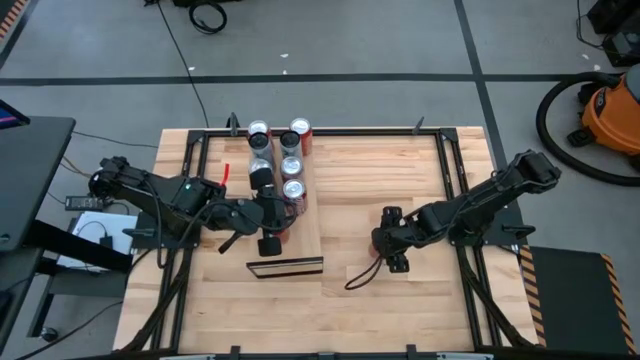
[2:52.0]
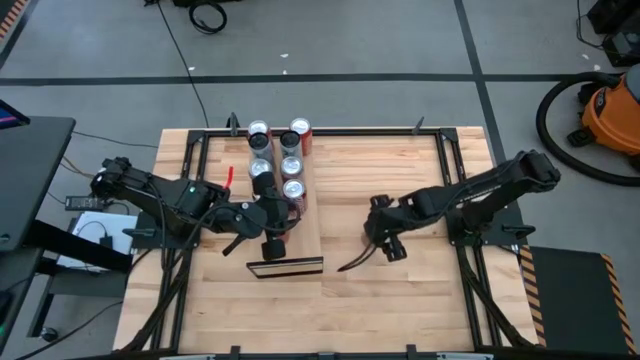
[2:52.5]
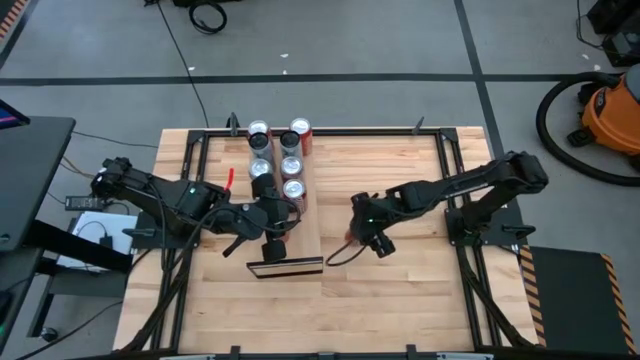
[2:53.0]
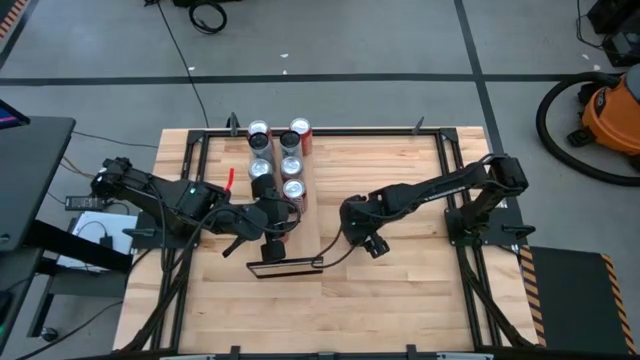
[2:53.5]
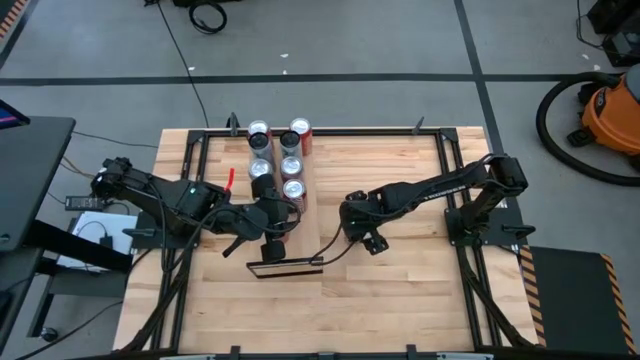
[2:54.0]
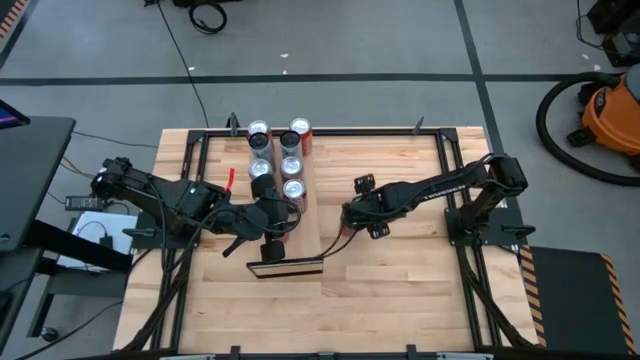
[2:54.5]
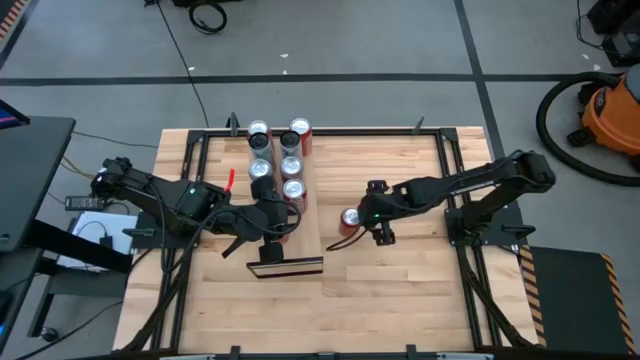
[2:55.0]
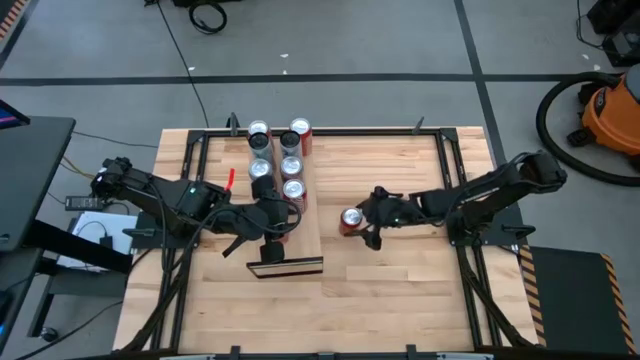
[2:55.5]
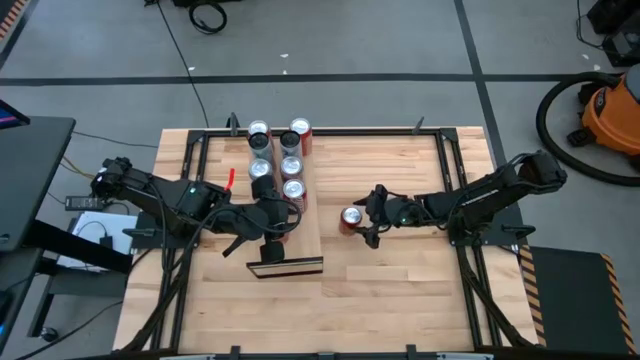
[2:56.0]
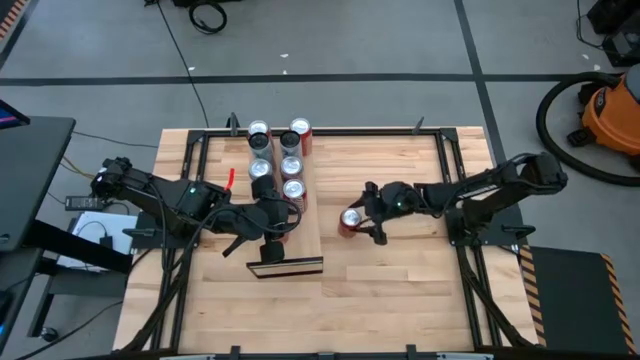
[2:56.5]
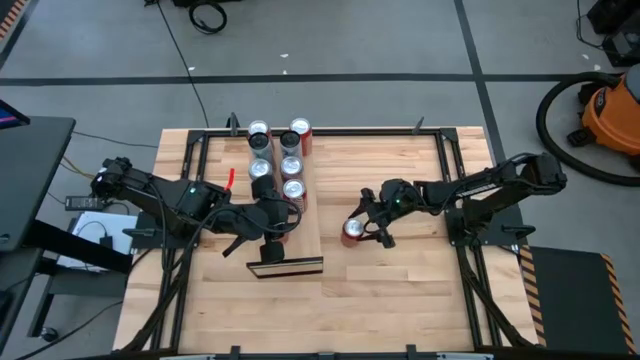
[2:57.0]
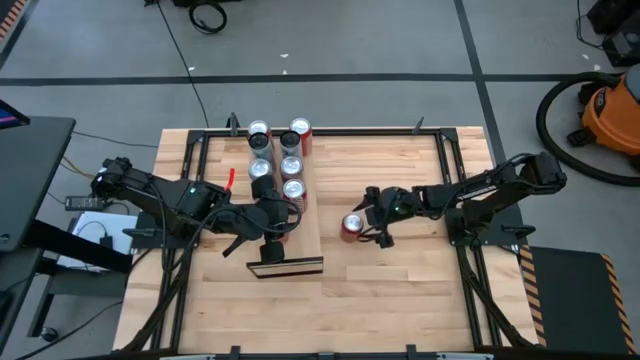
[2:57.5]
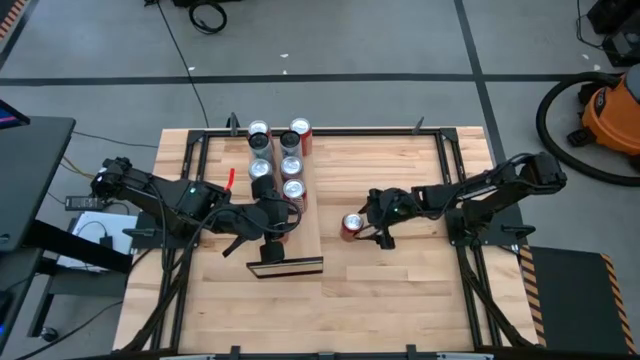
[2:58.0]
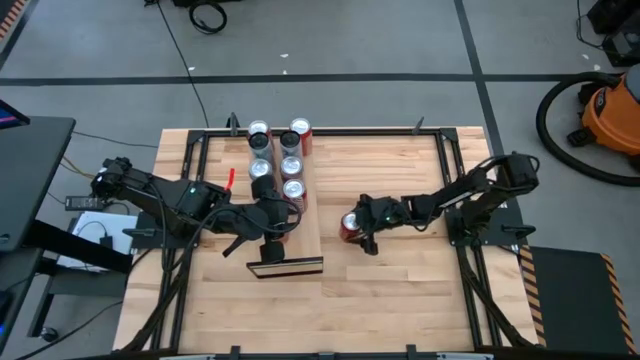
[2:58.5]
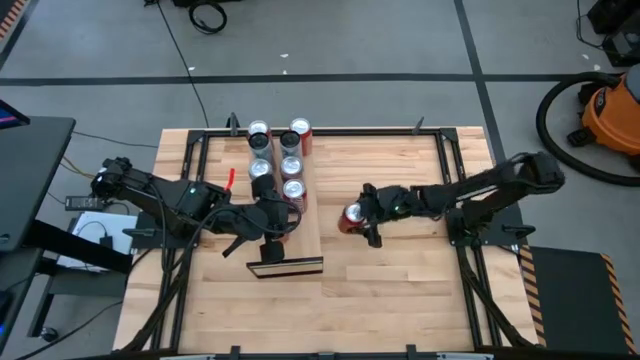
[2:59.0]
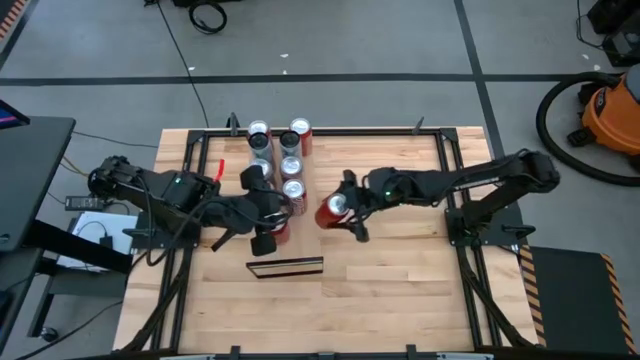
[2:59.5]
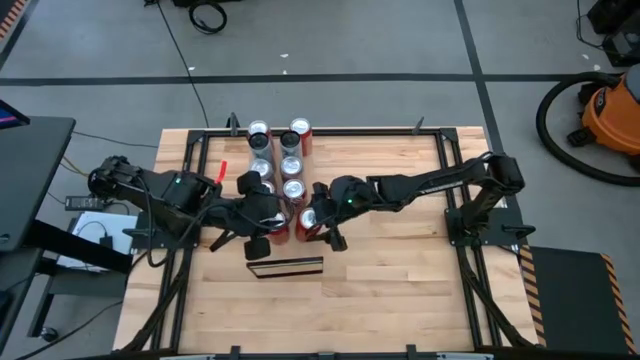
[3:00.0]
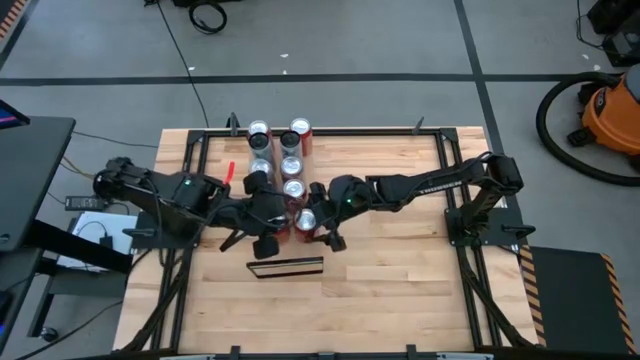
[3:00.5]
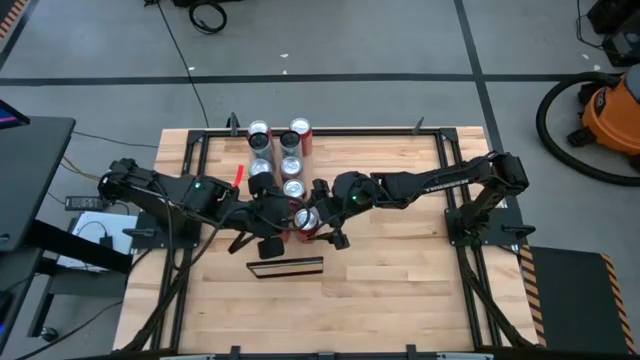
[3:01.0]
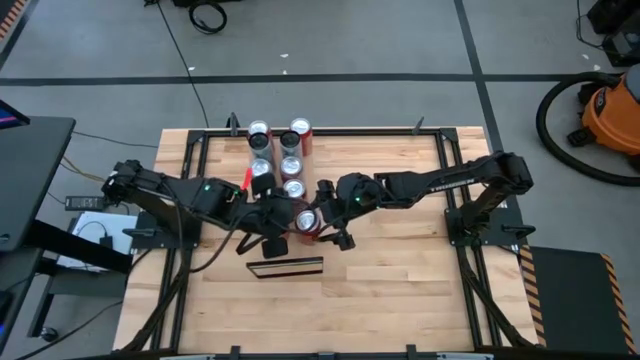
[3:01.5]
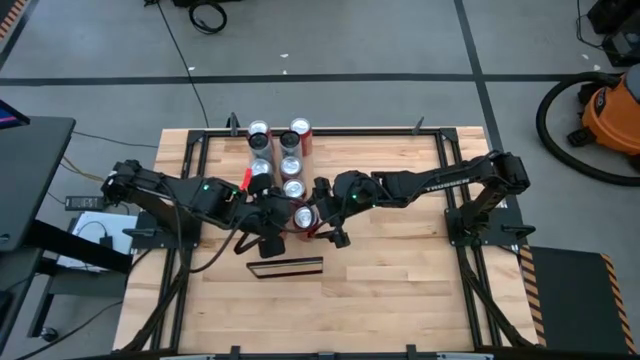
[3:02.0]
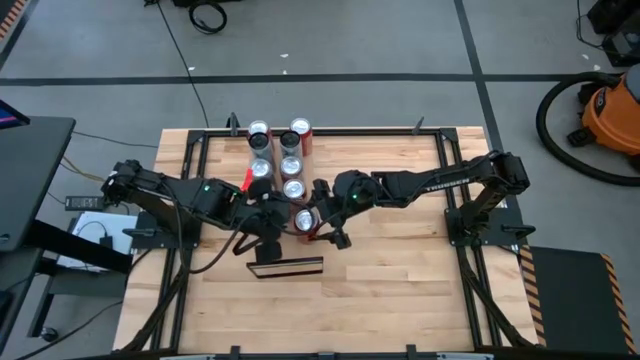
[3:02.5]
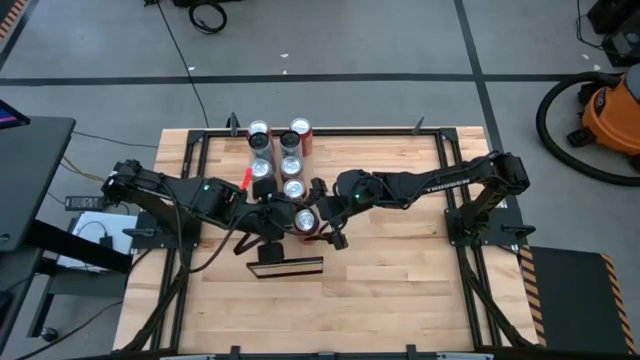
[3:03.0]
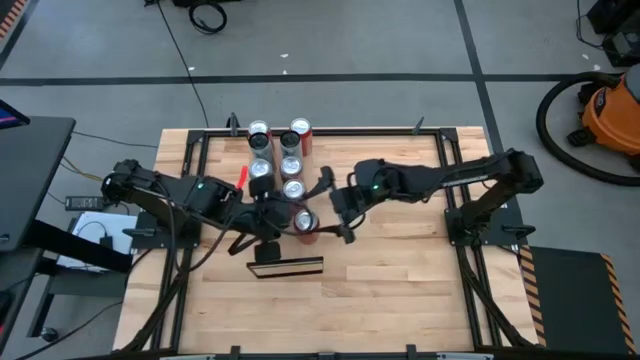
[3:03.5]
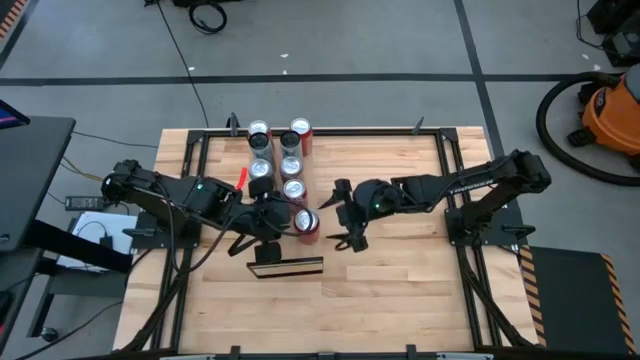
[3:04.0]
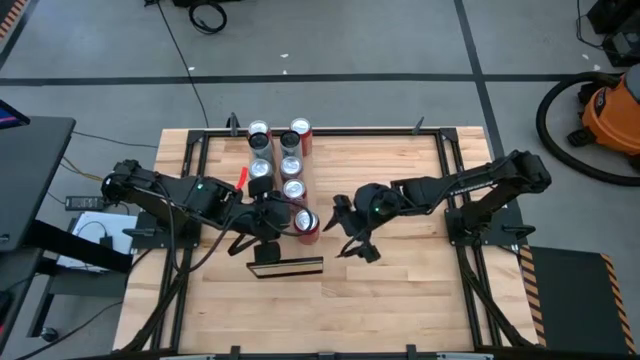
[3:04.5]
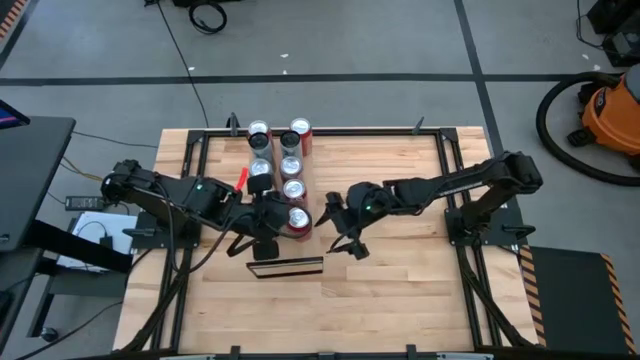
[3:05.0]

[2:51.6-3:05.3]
Task: Place canned beverage on shelf
Align the red and black soda can with the other red and black soda can on the shelf

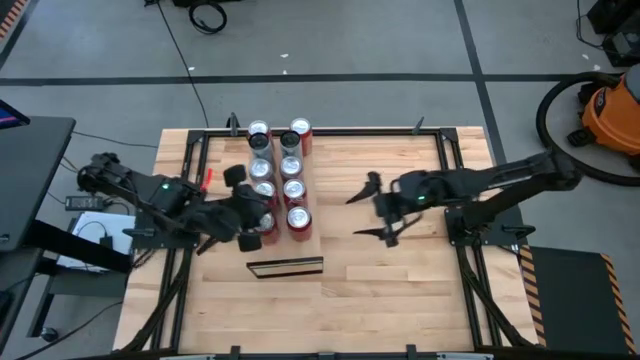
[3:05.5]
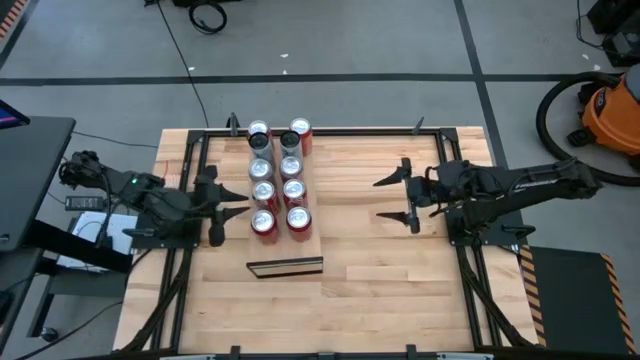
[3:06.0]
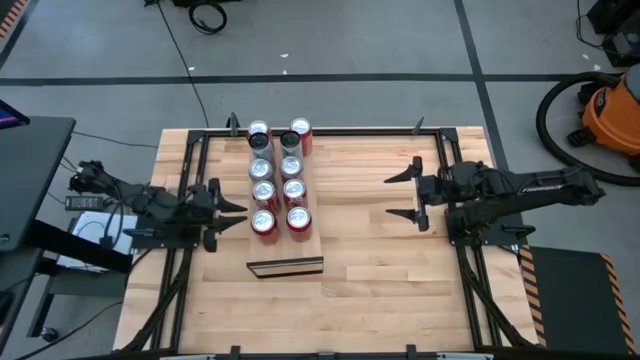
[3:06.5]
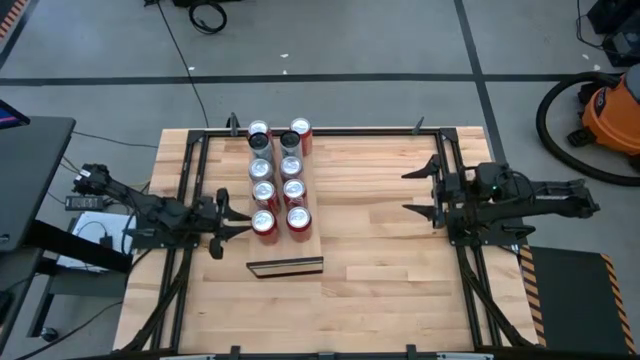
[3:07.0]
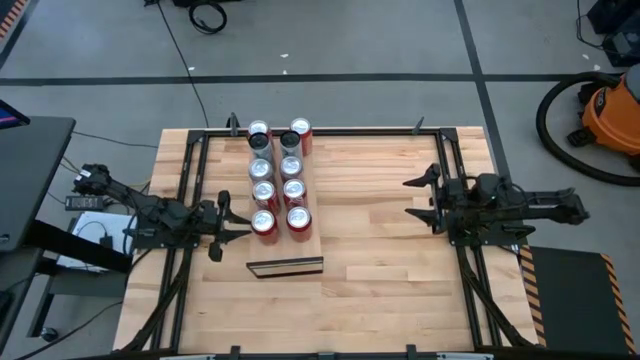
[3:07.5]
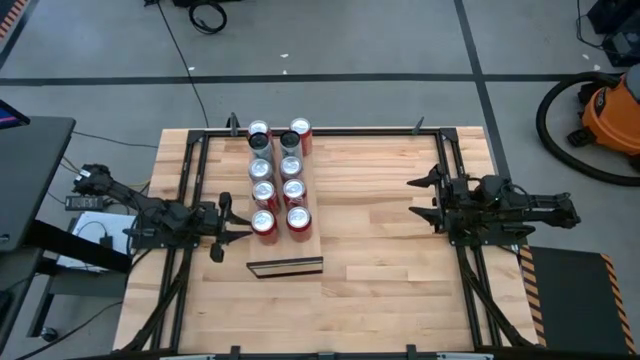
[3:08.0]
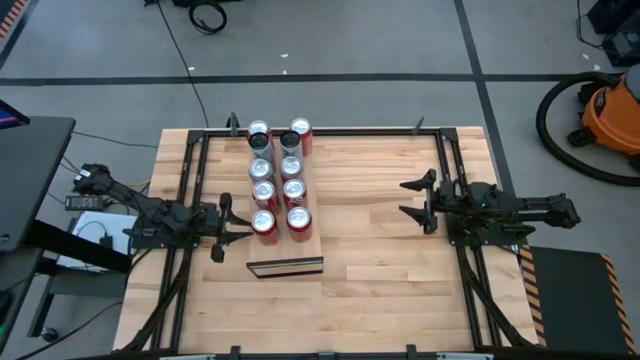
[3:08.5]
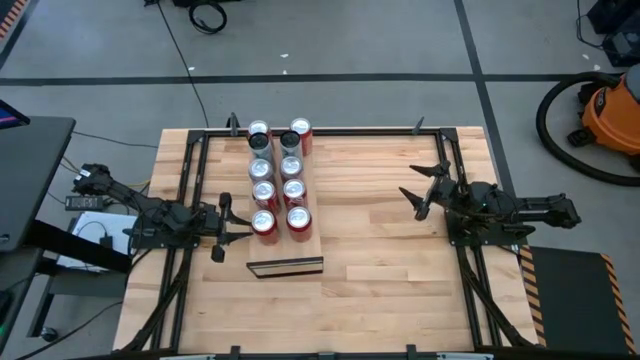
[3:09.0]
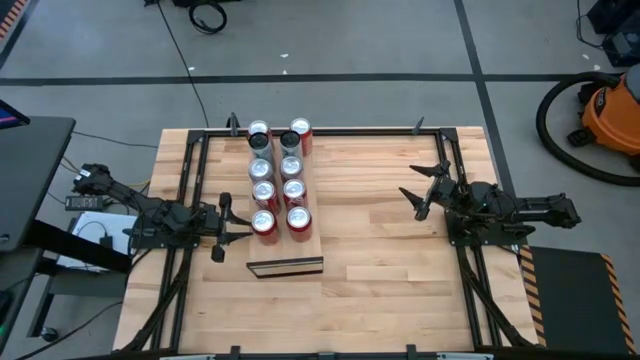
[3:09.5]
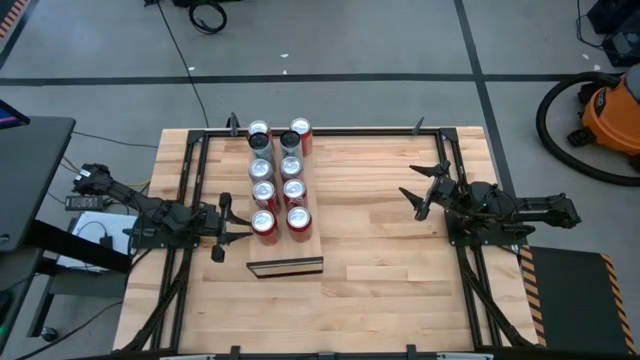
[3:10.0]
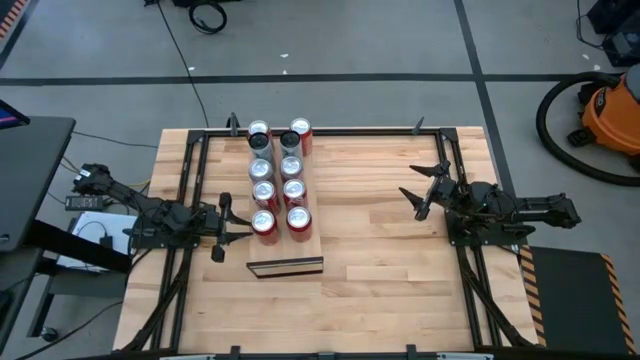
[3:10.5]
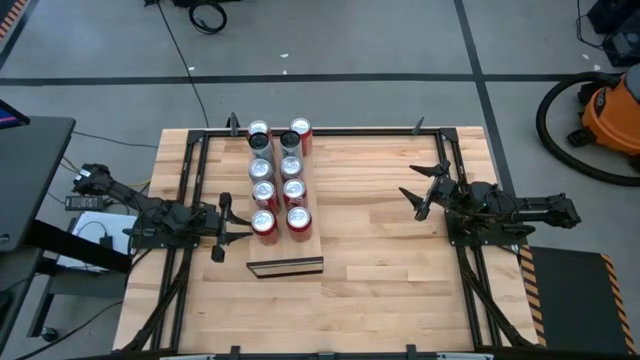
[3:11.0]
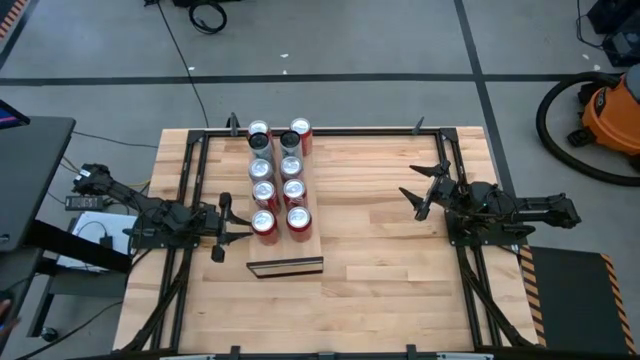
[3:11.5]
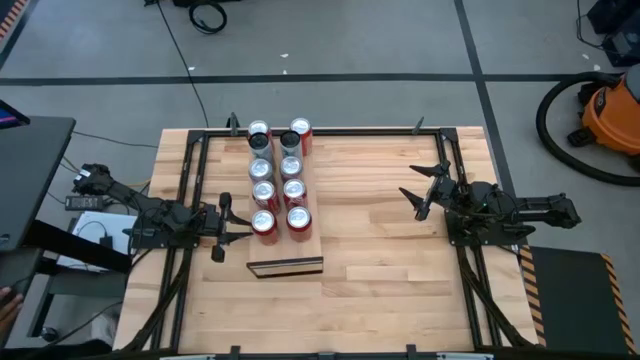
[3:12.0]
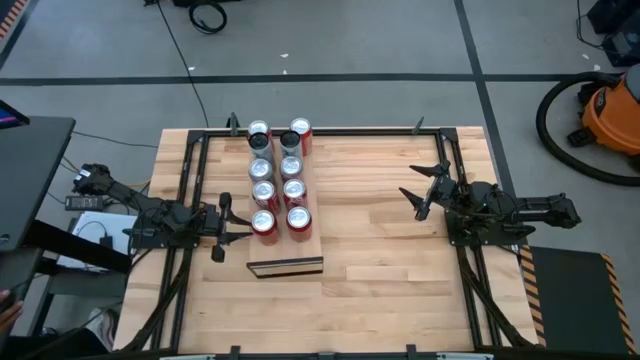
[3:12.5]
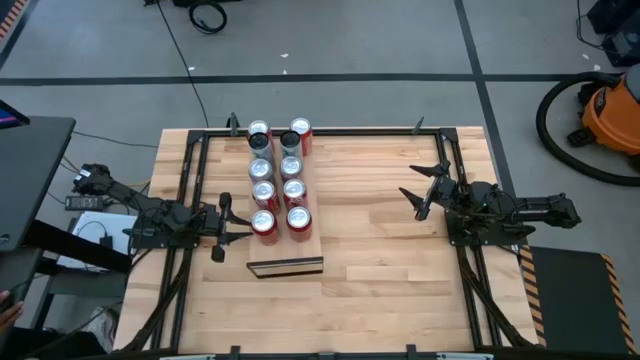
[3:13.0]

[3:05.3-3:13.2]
Return to Home Position
